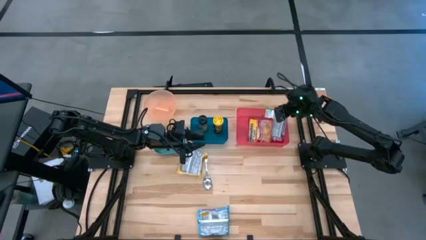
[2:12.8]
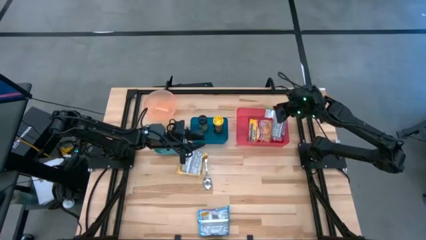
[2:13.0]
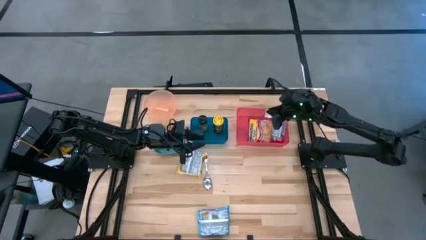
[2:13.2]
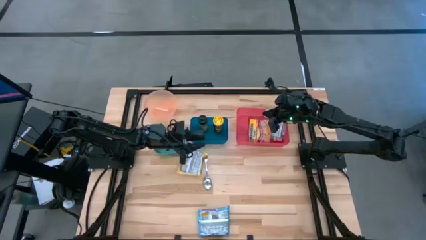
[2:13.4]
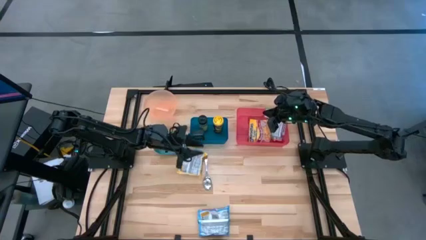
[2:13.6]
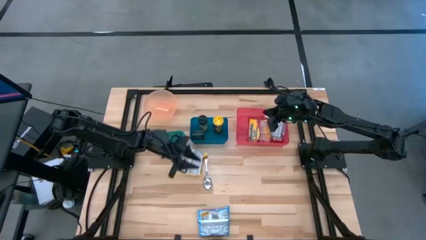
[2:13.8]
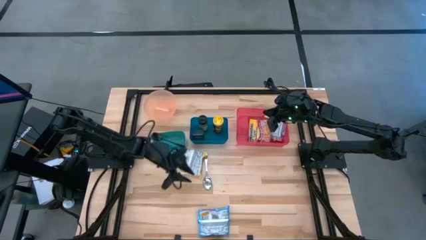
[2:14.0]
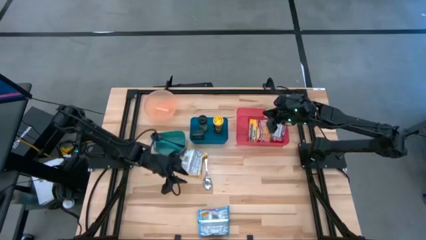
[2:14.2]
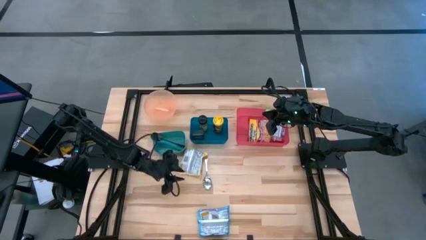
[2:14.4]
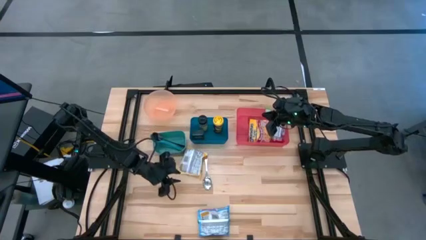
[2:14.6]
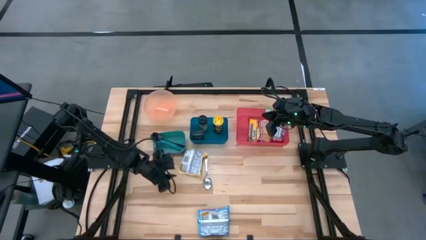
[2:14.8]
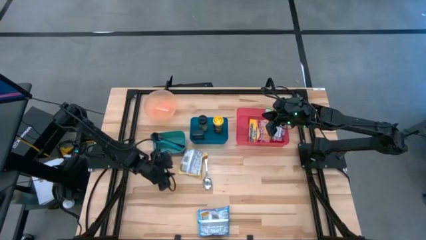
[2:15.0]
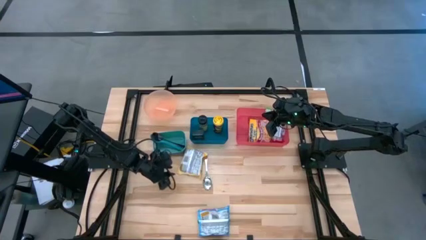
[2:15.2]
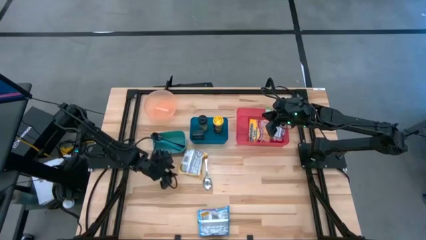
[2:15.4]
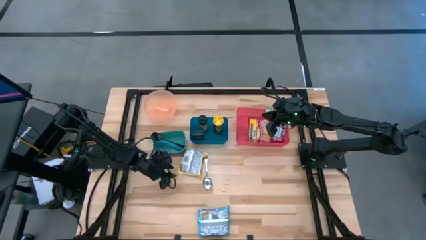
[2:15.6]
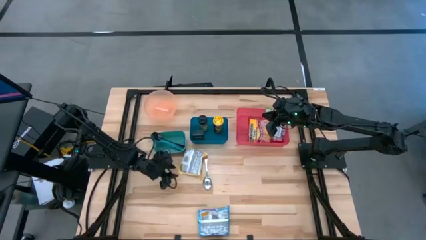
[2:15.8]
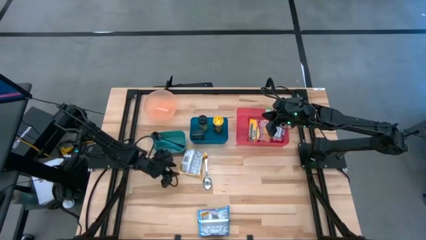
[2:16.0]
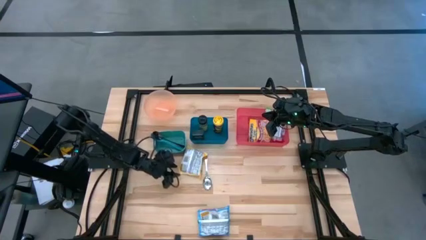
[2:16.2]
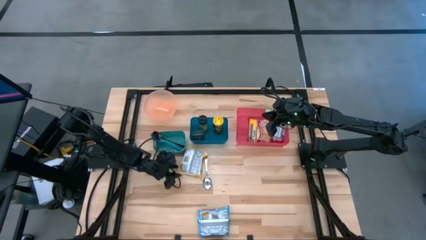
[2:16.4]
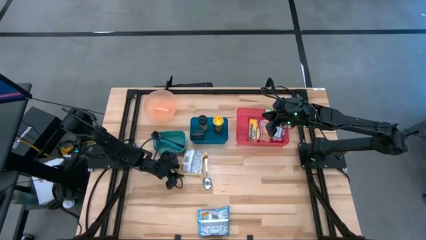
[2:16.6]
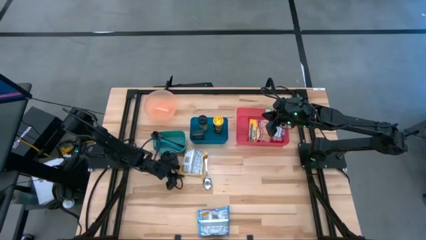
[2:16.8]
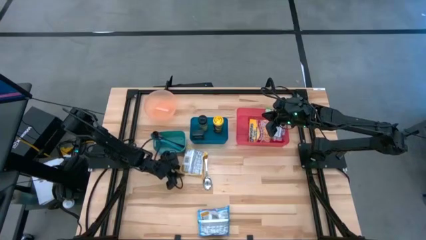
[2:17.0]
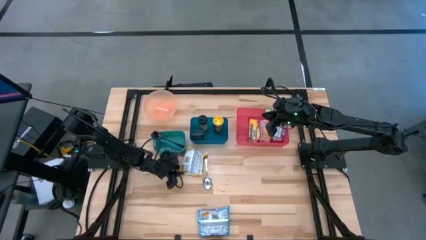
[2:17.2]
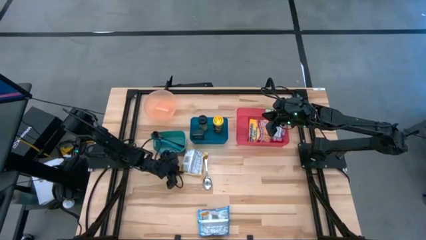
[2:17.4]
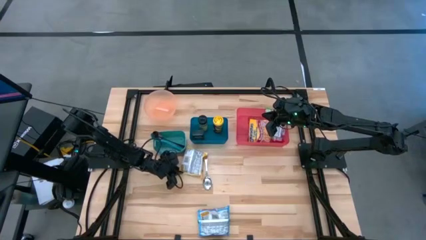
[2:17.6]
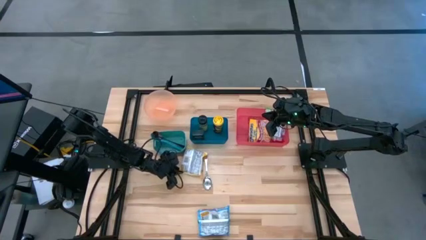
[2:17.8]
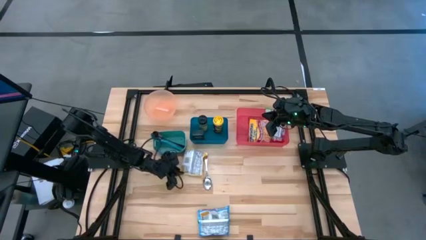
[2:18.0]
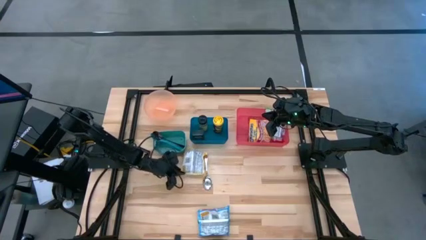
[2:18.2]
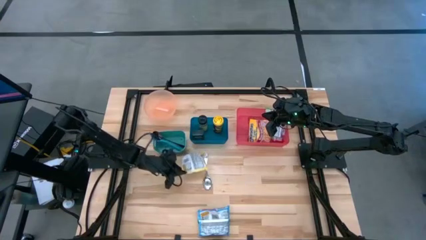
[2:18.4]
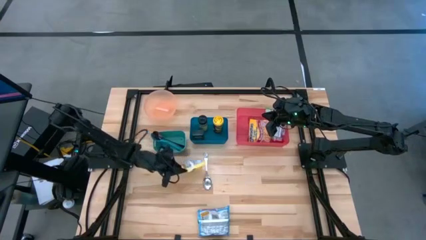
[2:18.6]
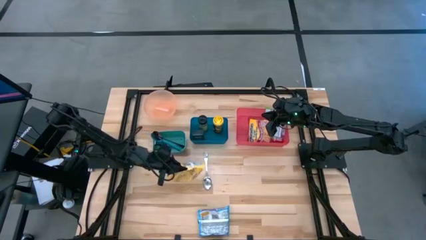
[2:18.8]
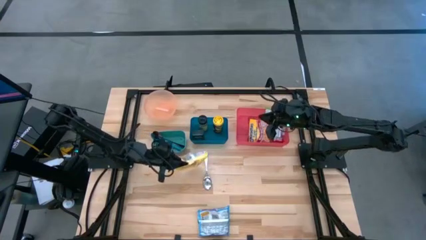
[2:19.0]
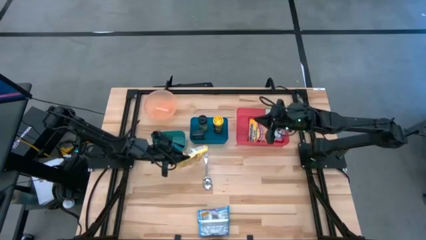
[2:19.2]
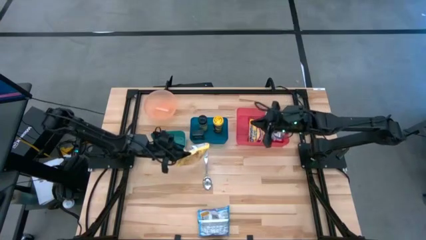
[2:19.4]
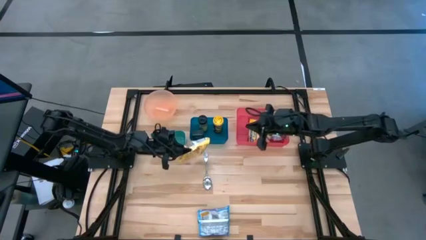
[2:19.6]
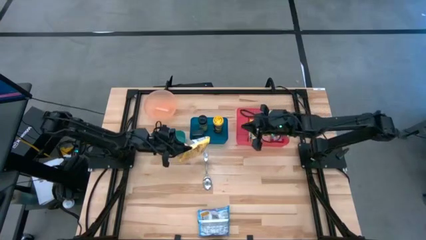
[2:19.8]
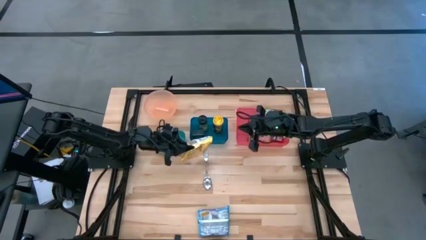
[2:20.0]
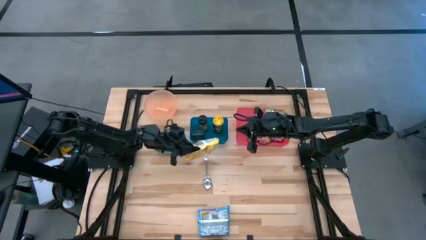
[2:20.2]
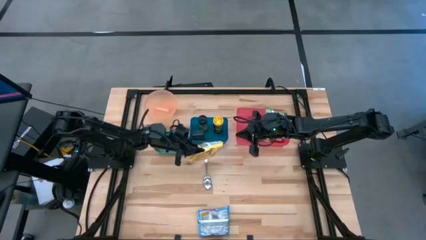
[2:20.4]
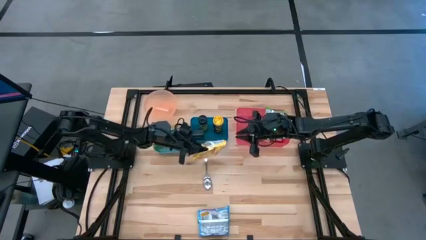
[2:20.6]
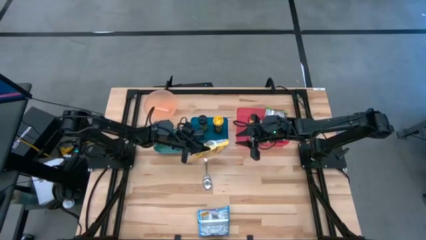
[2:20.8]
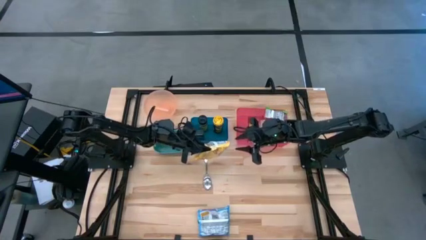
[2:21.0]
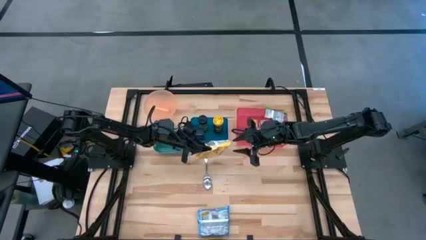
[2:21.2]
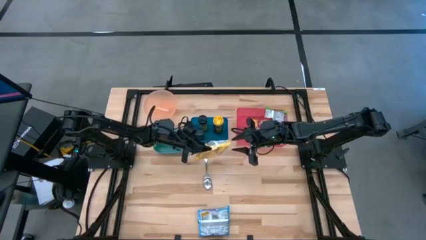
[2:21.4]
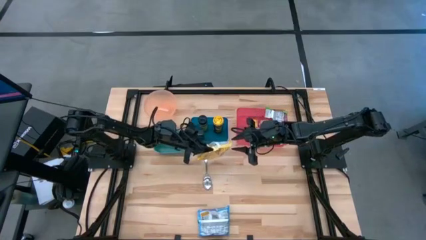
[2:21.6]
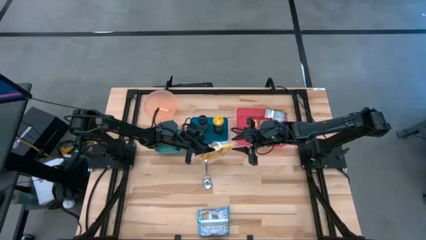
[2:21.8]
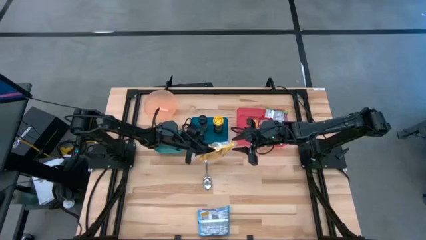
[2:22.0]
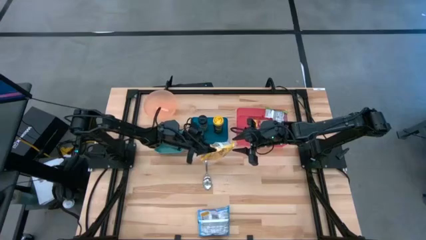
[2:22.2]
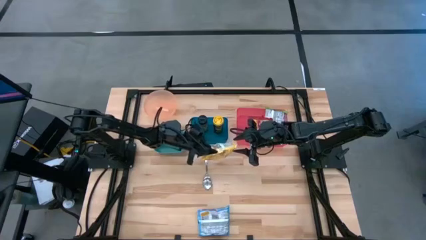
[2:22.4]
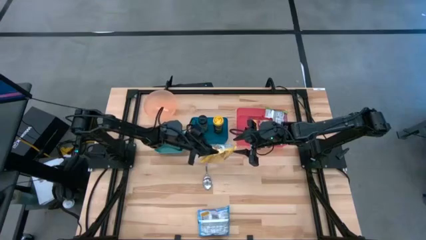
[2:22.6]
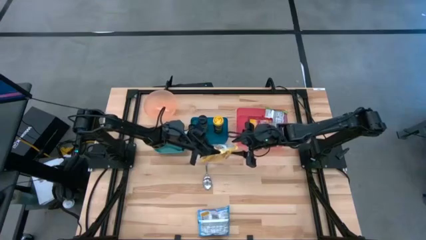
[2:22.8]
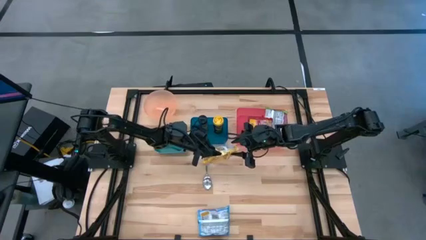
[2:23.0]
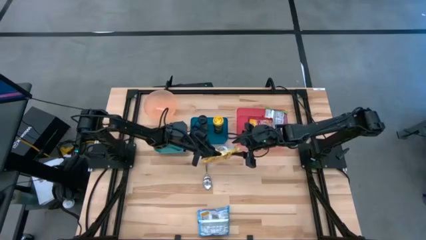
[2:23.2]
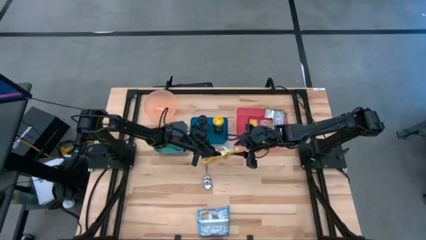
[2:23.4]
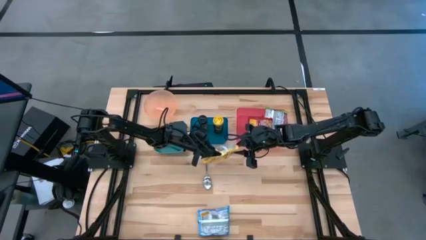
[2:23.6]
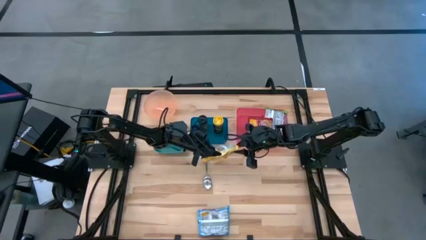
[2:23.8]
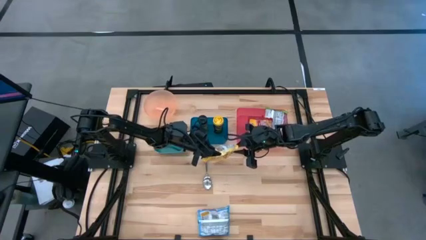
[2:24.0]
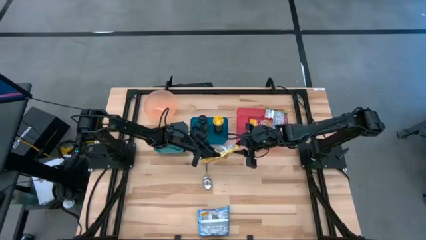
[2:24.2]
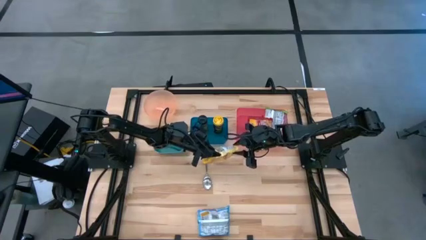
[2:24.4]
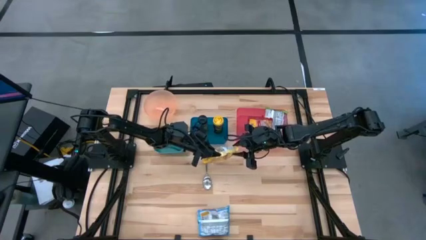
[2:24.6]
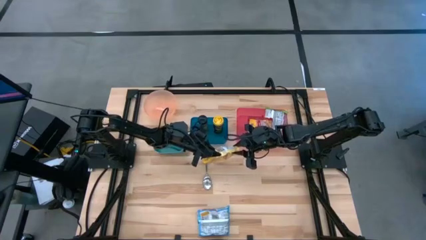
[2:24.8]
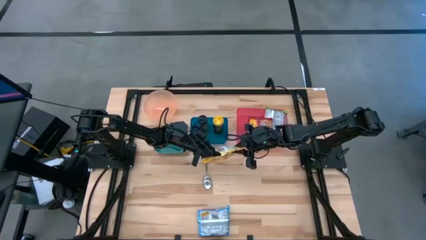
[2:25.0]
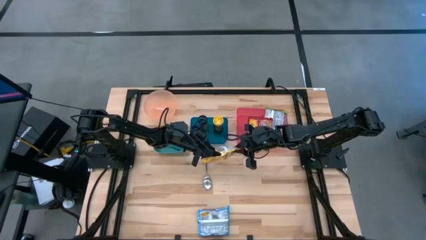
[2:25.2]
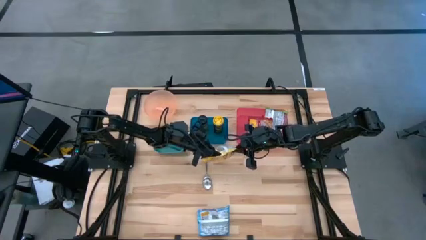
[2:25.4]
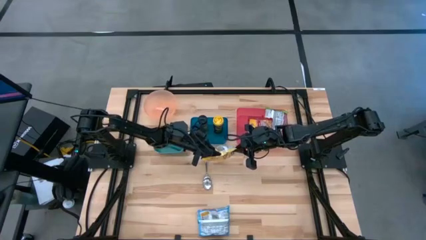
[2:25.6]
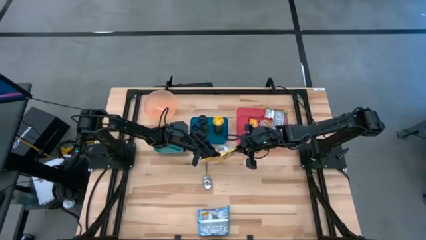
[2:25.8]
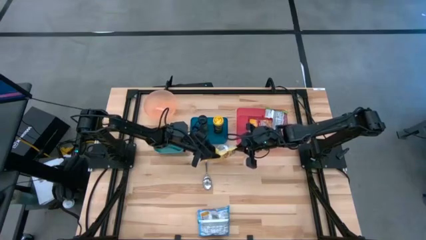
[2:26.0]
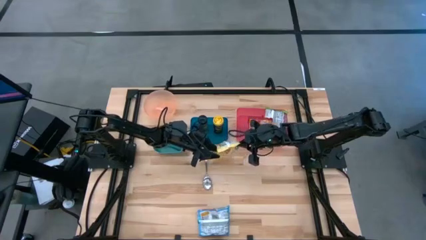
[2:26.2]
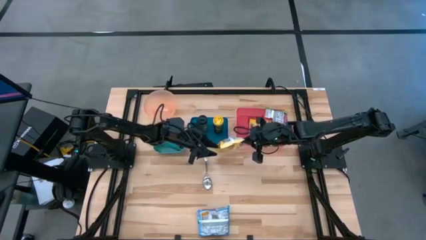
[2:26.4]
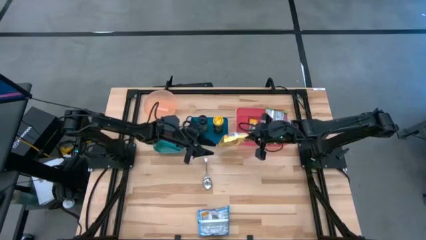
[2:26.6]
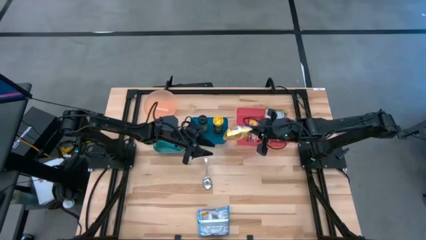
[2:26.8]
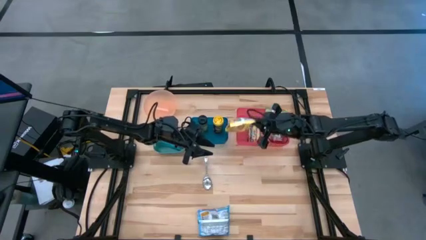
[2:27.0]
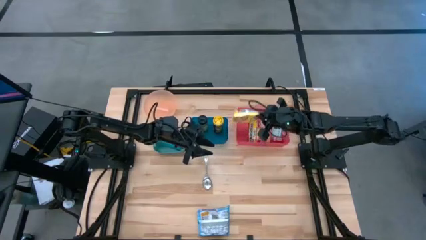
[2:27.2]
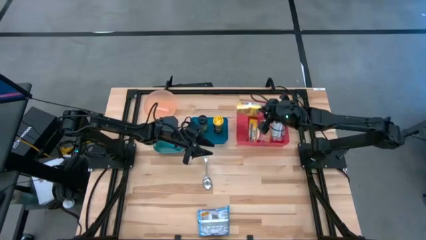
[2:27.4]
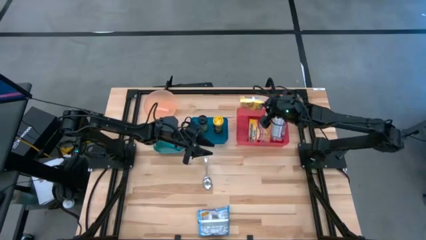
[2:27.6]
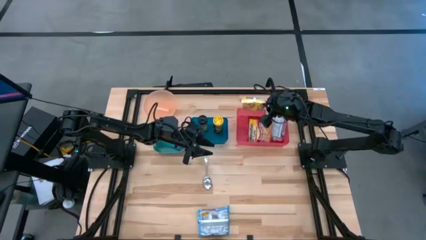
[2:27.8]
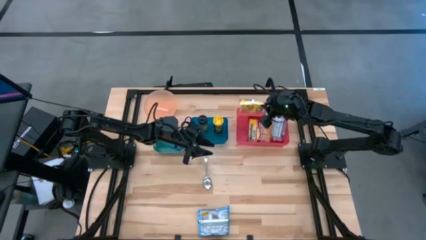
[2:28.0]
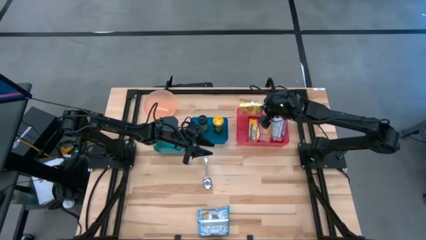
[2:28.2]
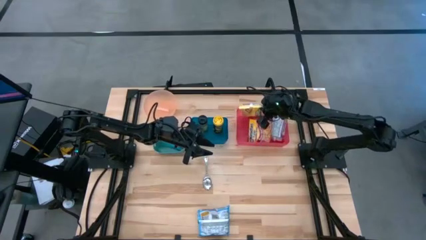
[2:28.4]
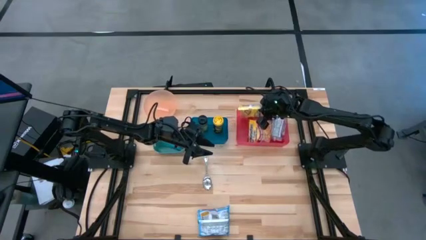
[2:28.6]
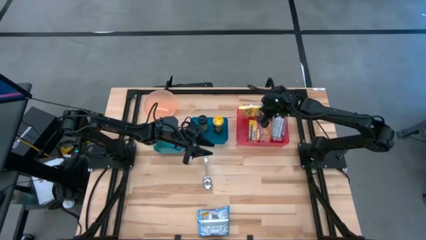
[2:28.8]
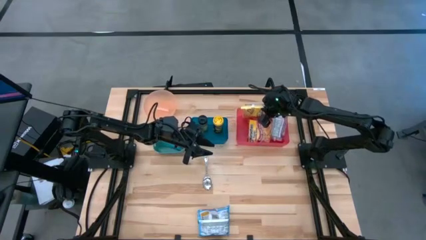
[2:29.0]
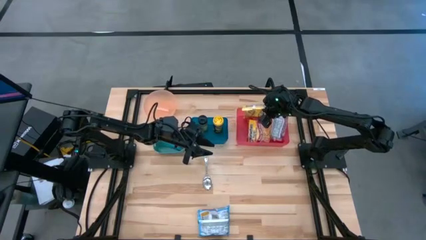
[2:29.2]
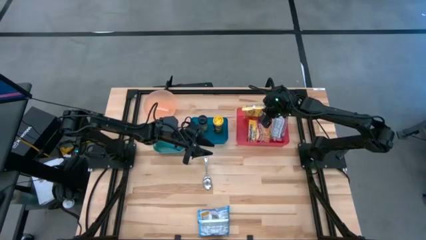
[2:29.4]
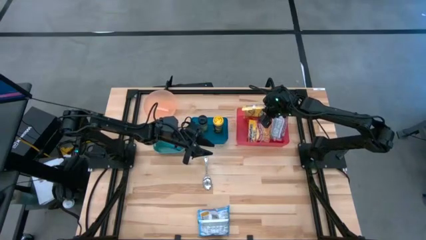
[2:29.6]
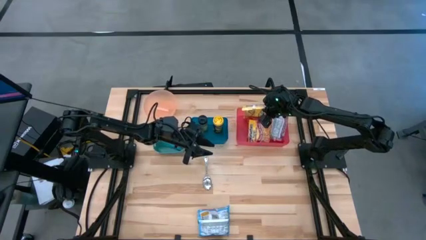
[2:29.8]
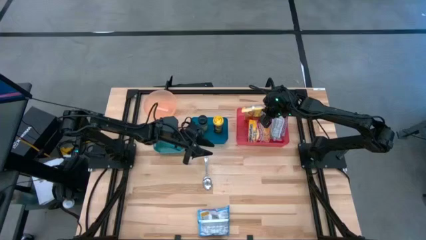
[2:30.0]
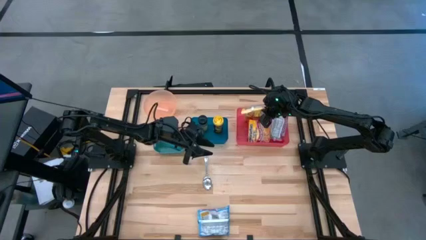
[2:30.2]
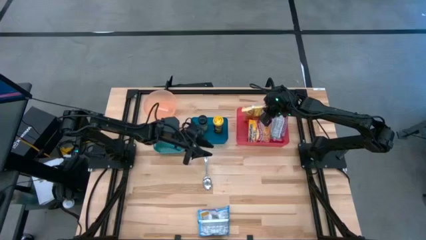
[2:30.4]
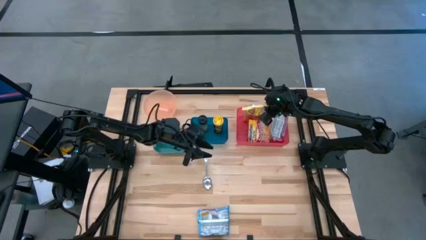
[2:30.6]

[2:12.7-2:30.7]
Task: Pick & Place Food Item
Put the yellow noodle pack into the pink bin
